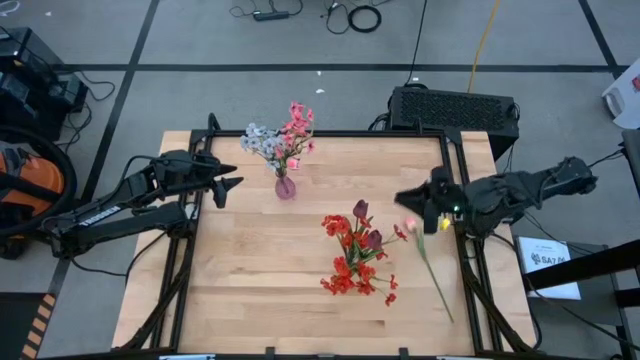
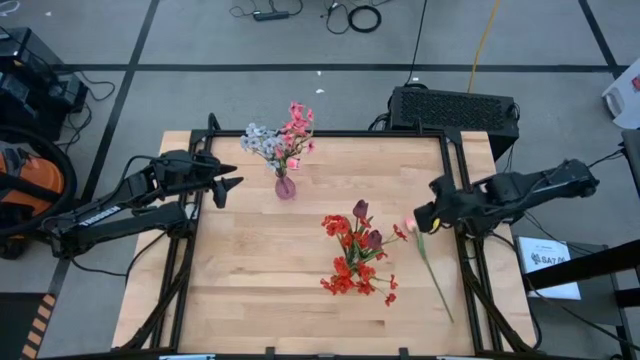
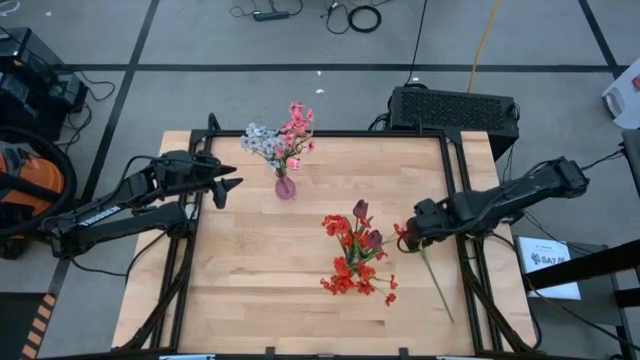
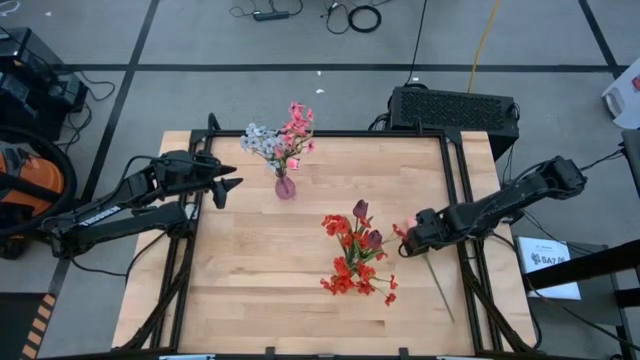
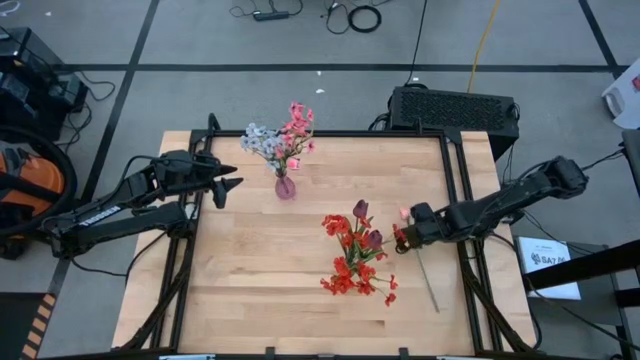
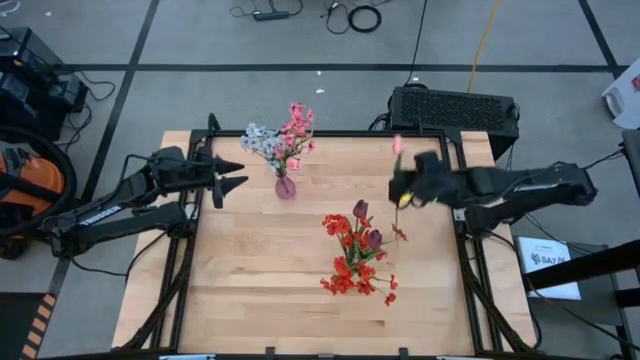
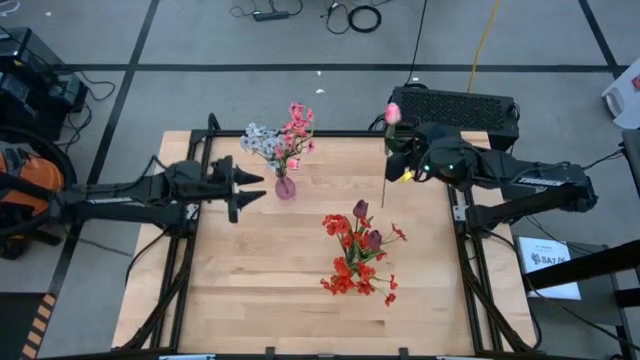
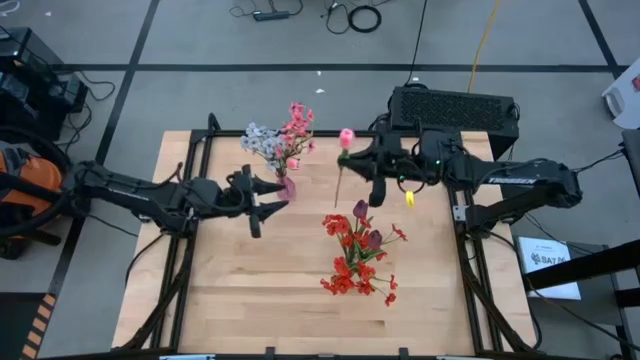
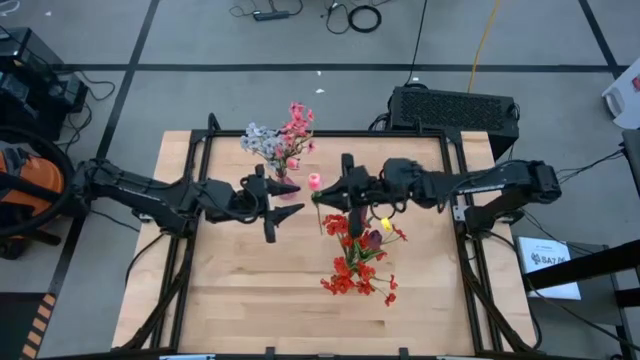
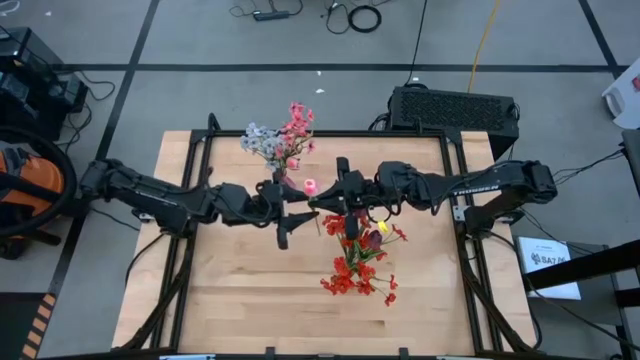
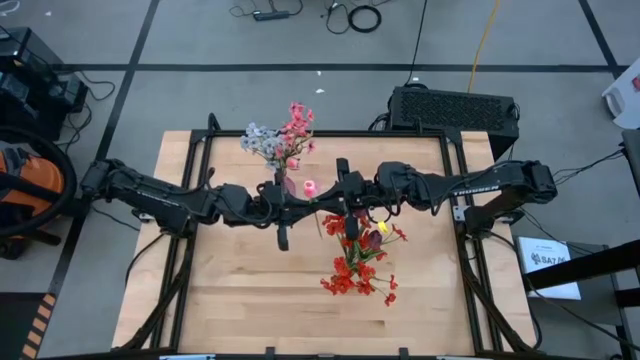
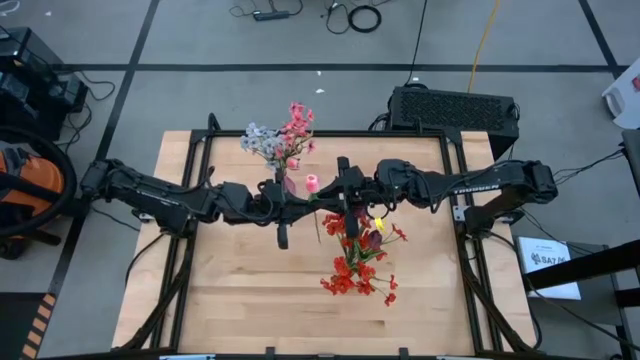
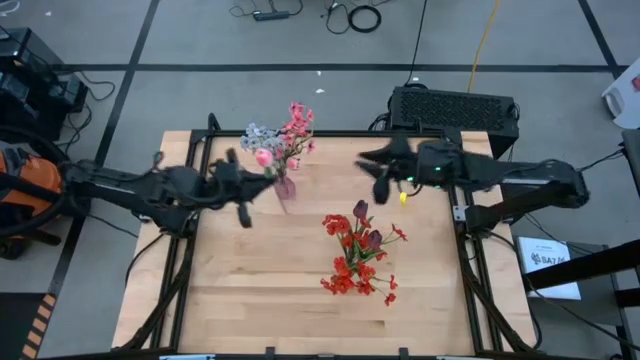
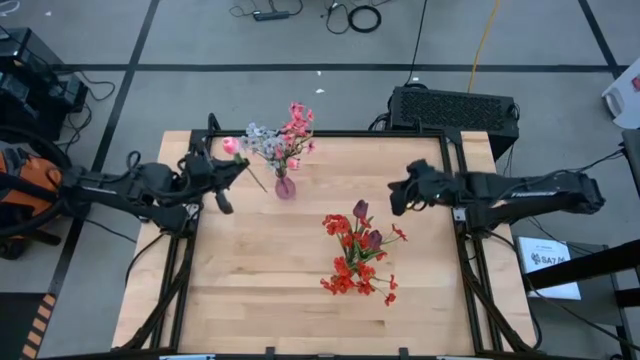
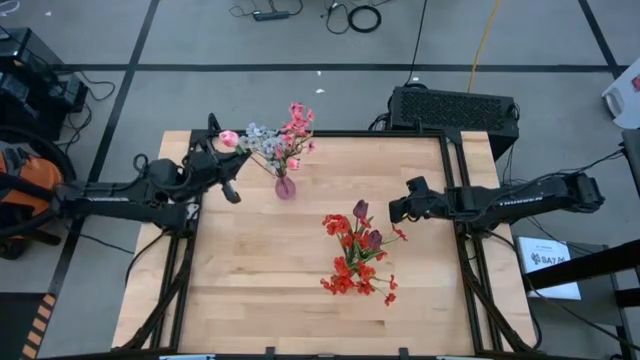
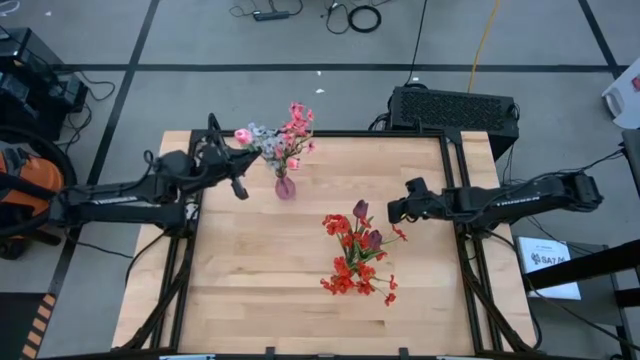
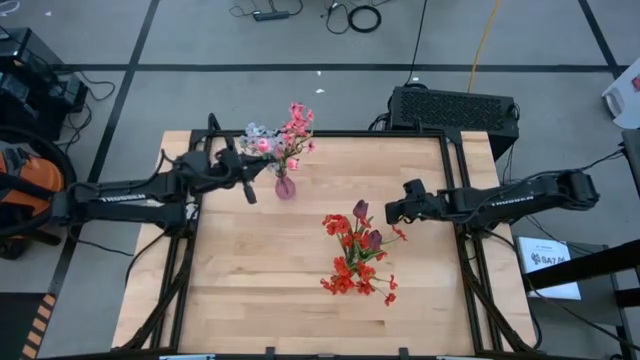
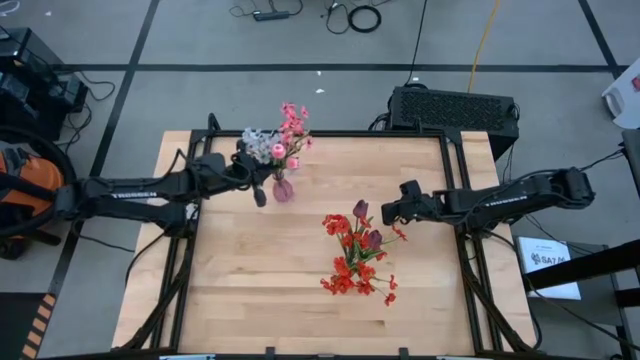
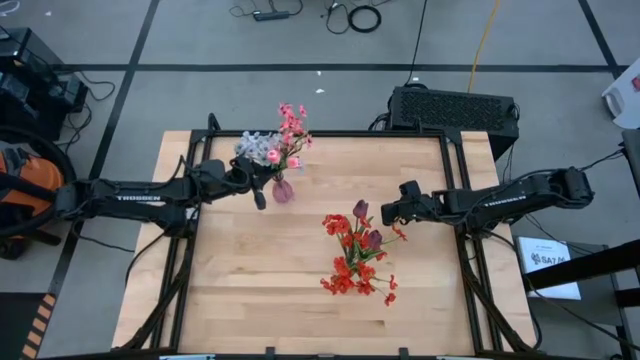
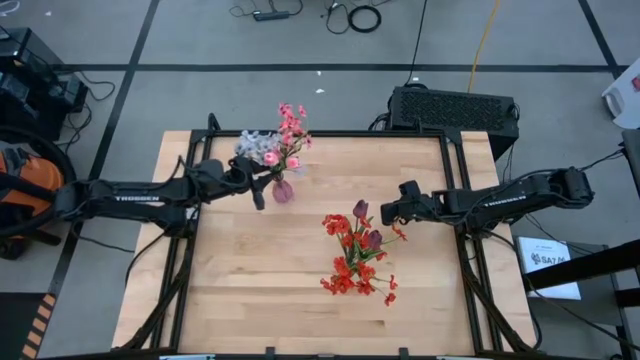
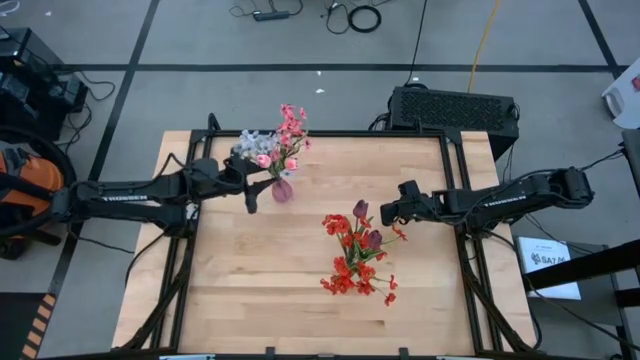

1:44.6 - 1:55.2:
Task: Sort flowers into vase by color
Put the pink tulip into the light violet flower vase

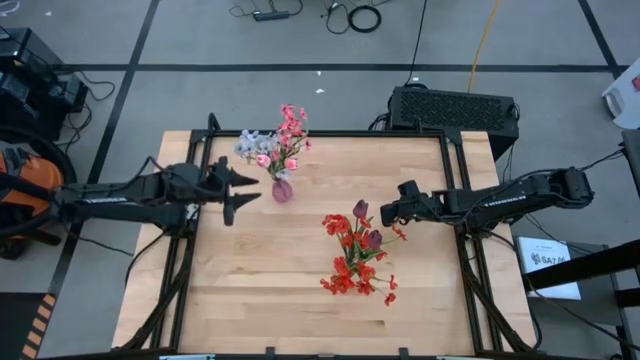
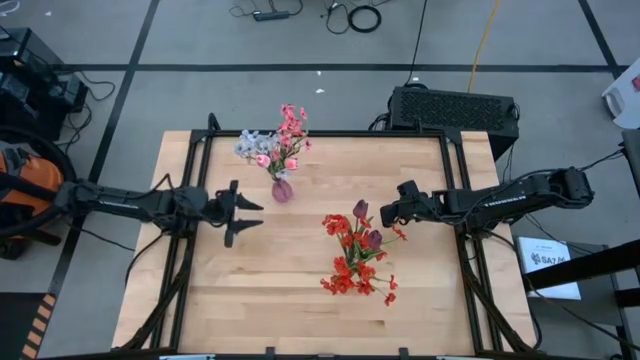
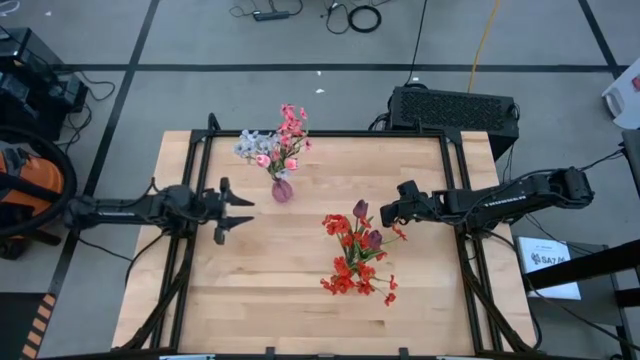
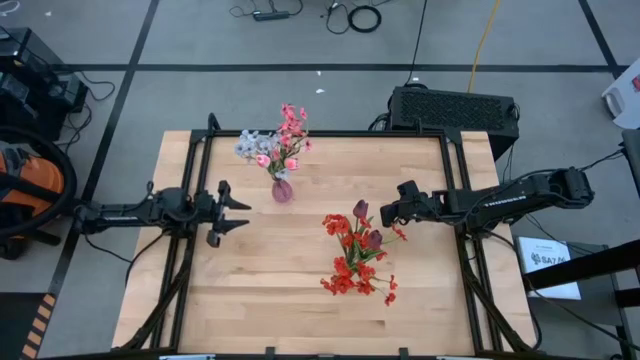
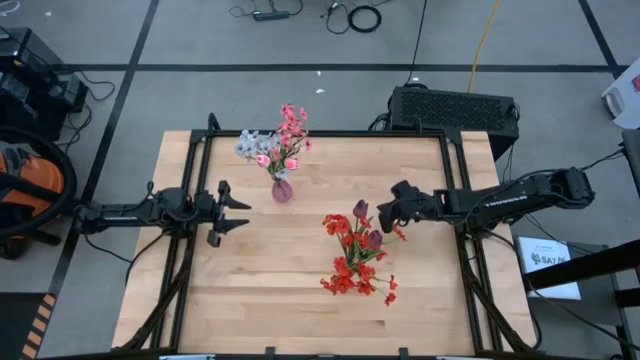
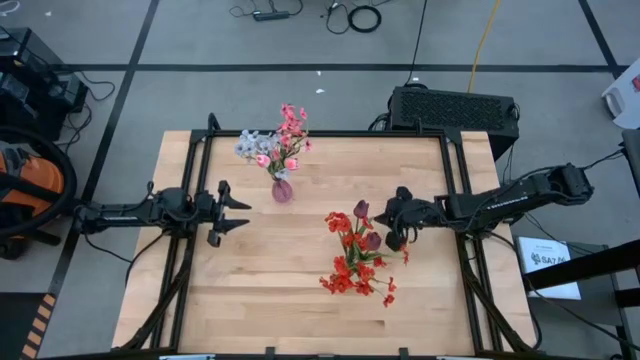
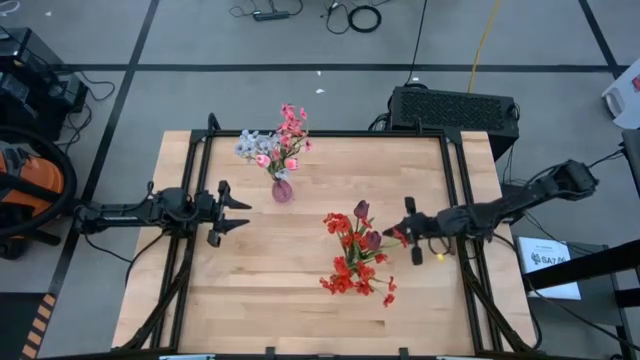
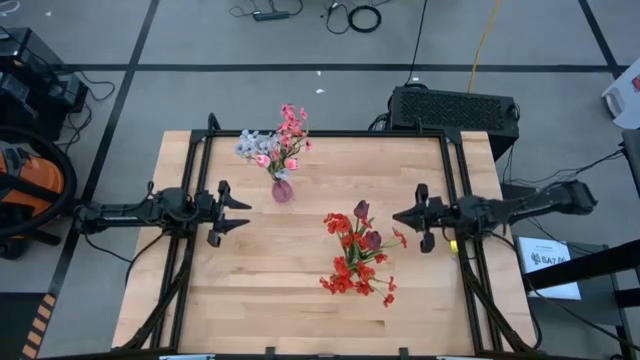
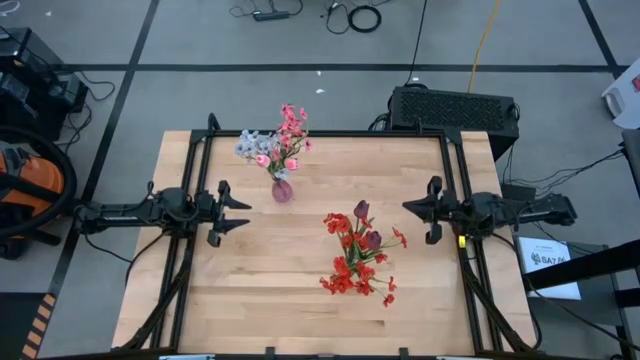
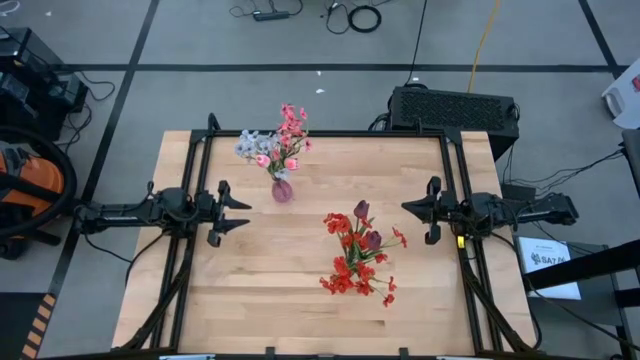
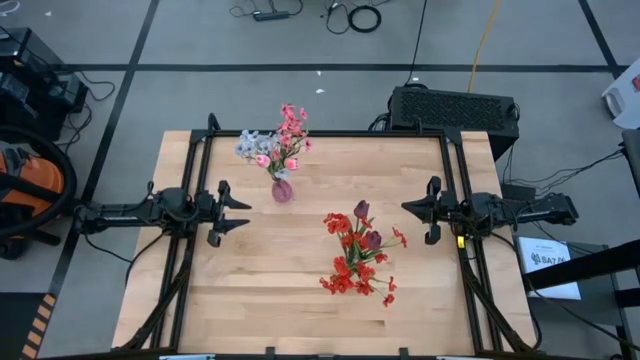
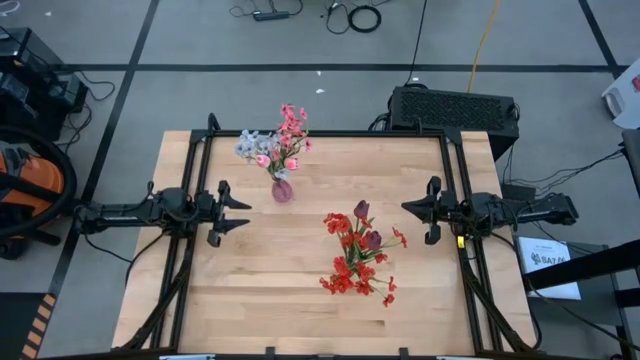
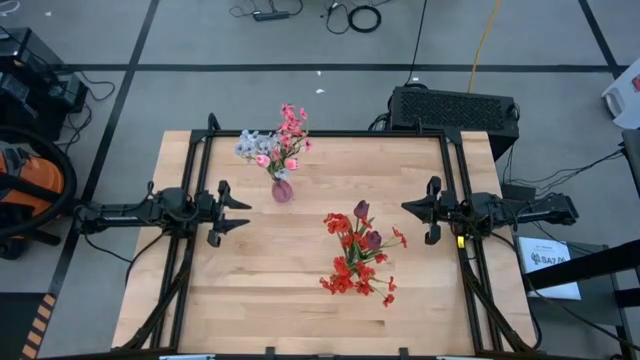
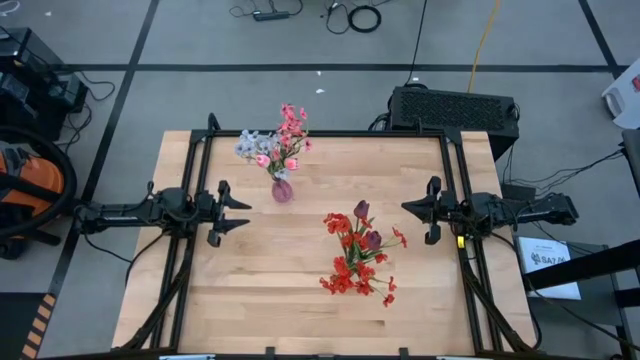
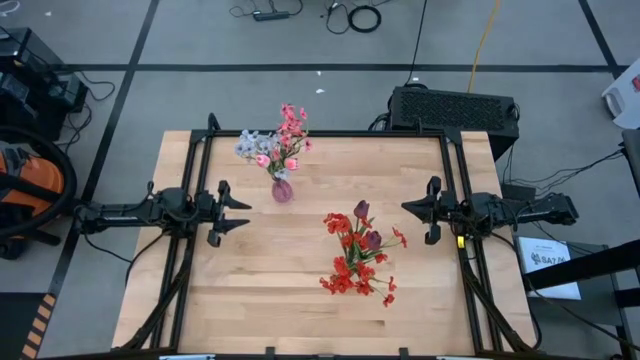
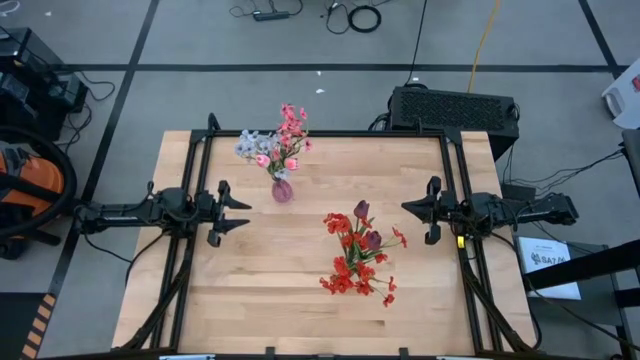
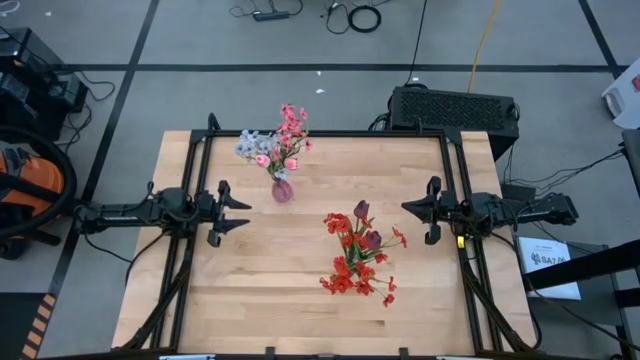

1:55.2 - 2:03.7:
Return to Home Position

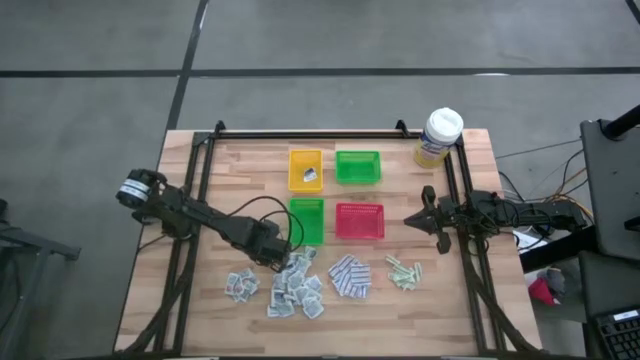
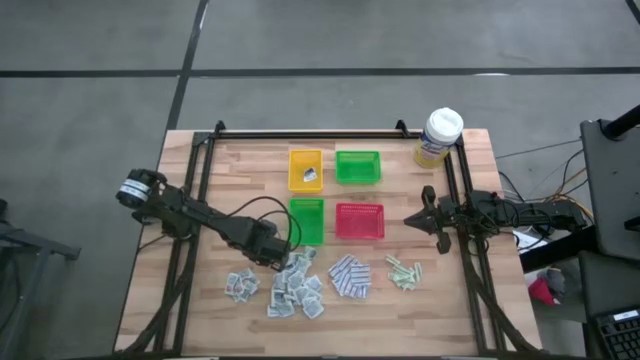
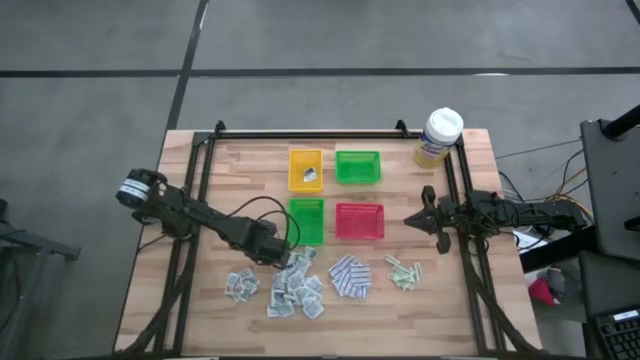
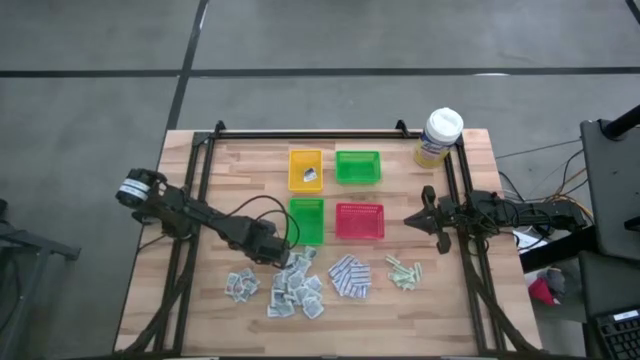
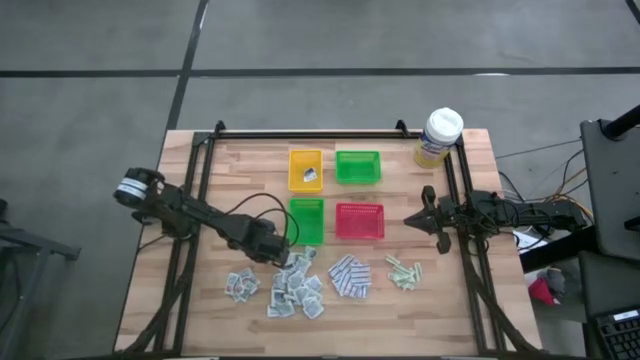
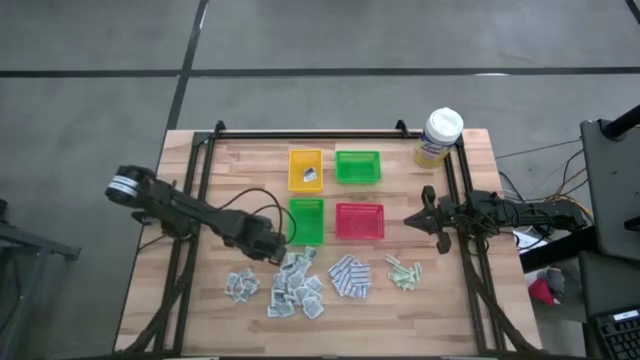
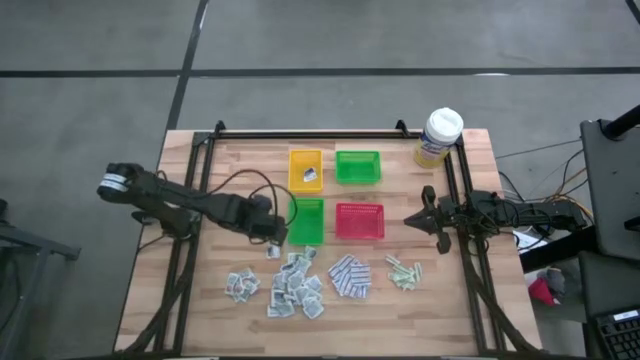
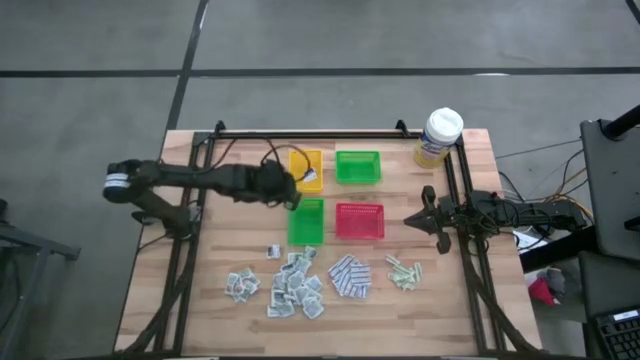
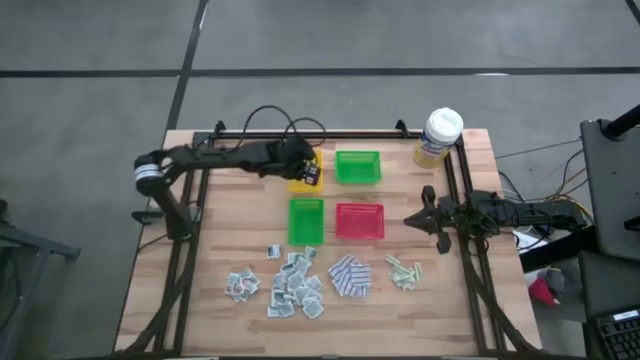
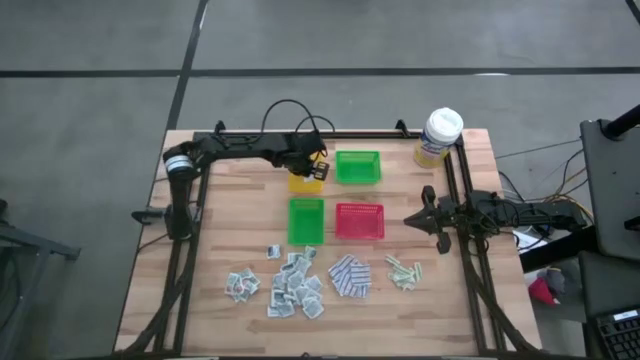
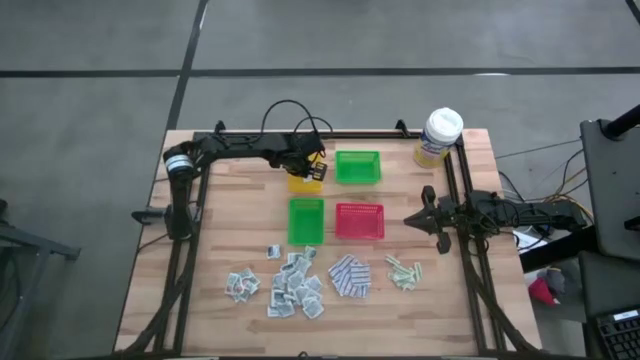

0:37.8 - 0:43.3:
Task: Pick & Place First Aid Supplies
Put the blue alcohol pad into the yellow bin
